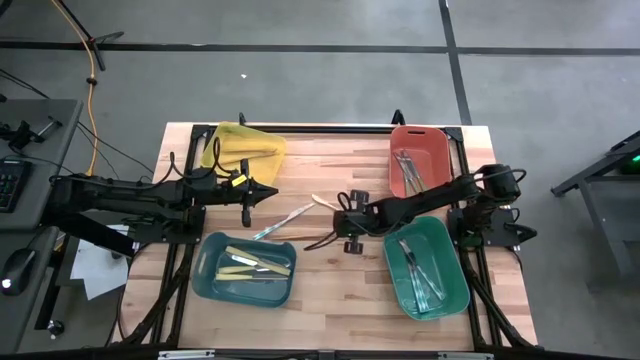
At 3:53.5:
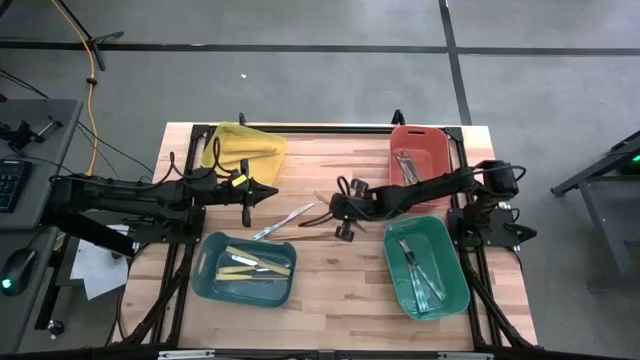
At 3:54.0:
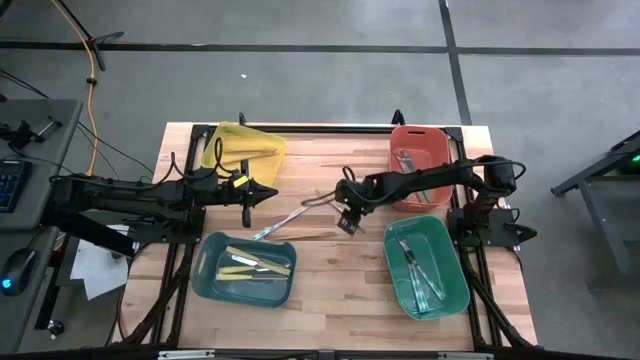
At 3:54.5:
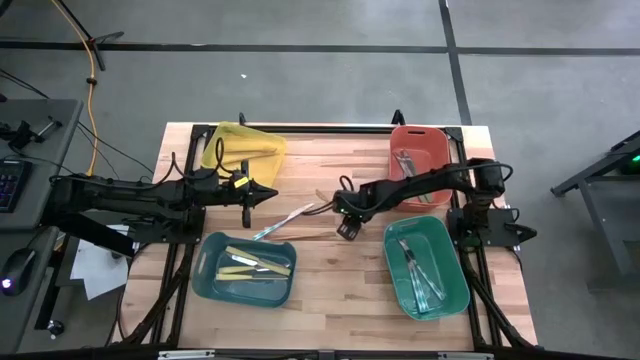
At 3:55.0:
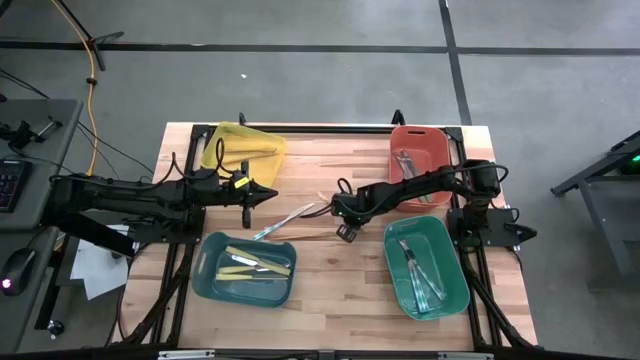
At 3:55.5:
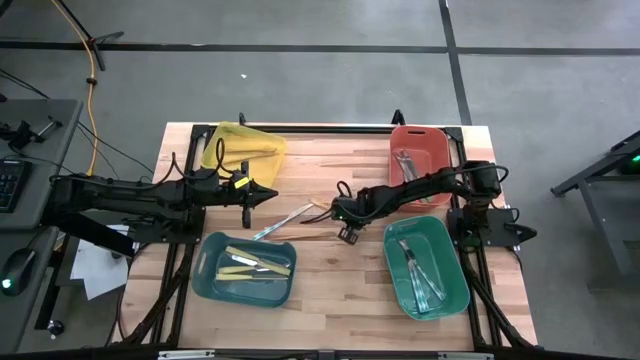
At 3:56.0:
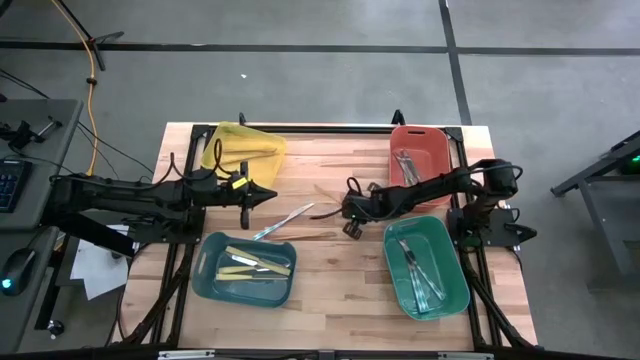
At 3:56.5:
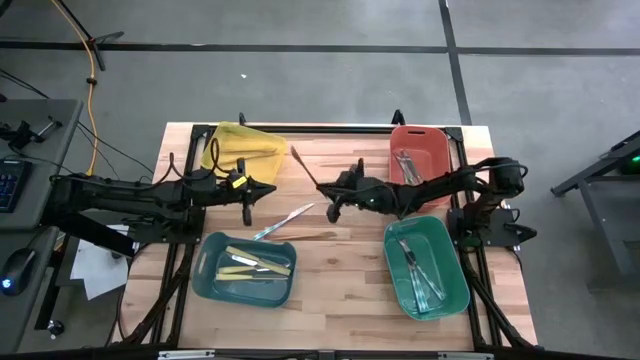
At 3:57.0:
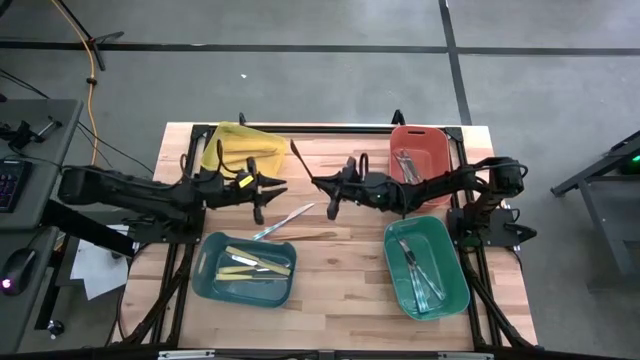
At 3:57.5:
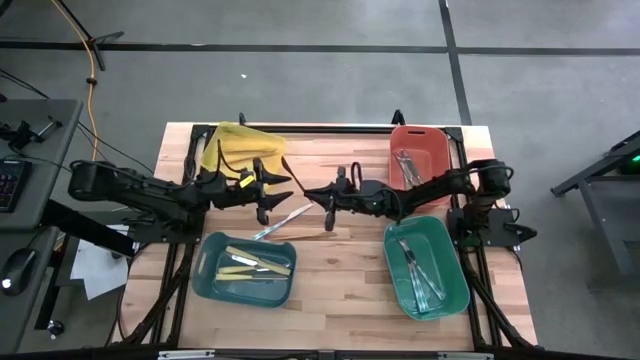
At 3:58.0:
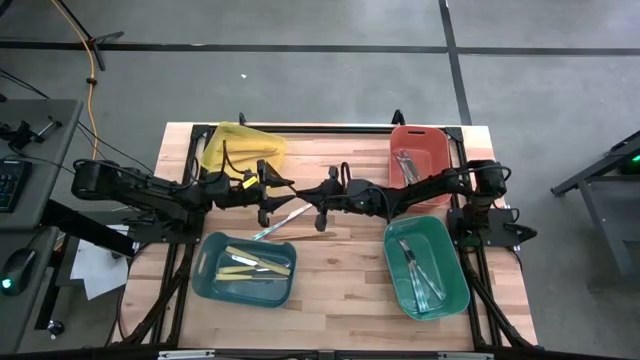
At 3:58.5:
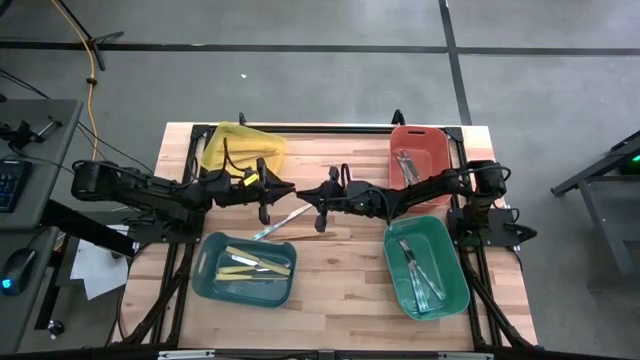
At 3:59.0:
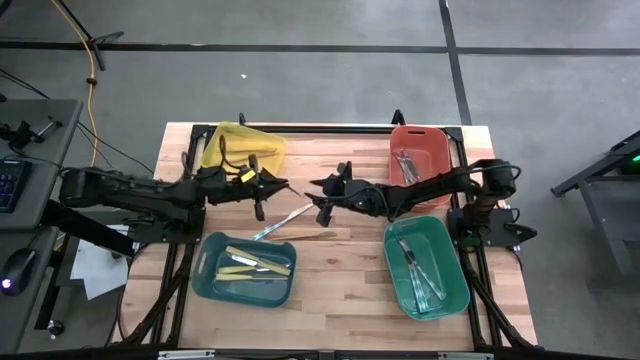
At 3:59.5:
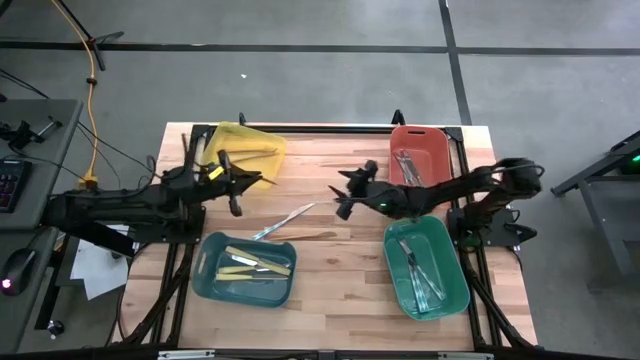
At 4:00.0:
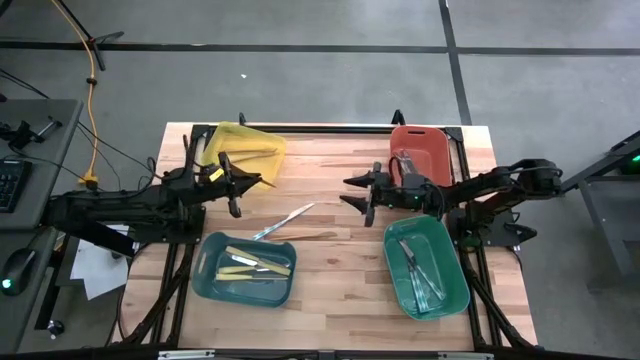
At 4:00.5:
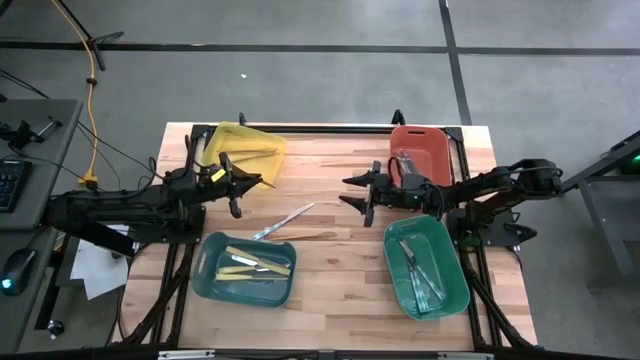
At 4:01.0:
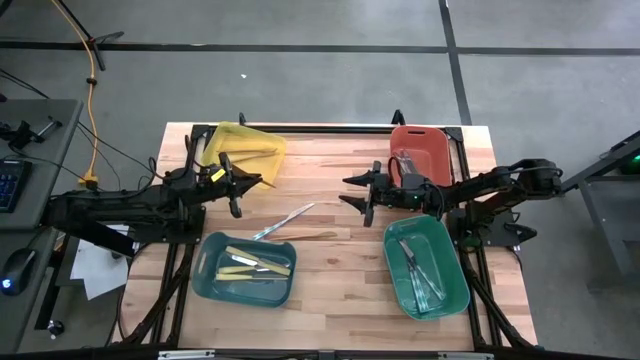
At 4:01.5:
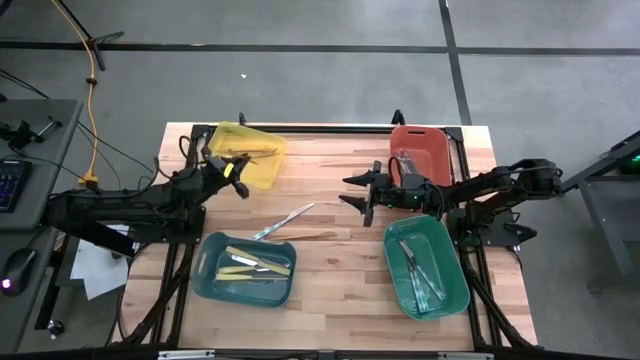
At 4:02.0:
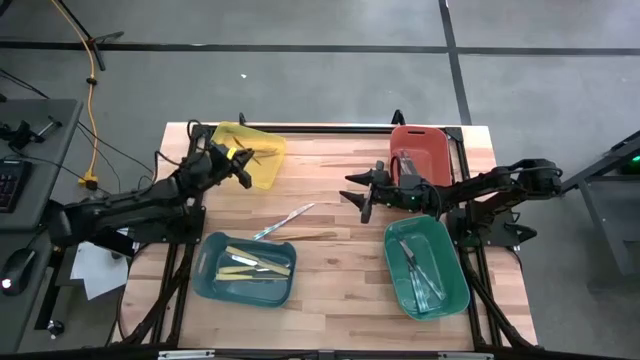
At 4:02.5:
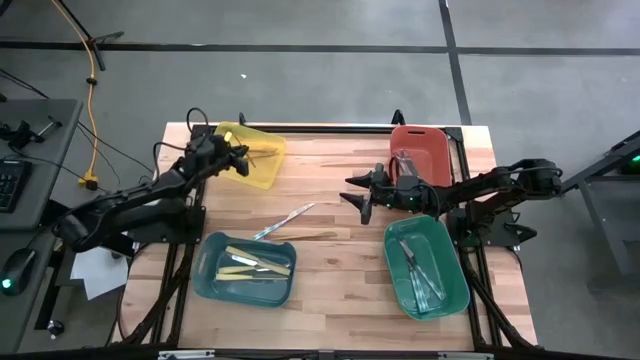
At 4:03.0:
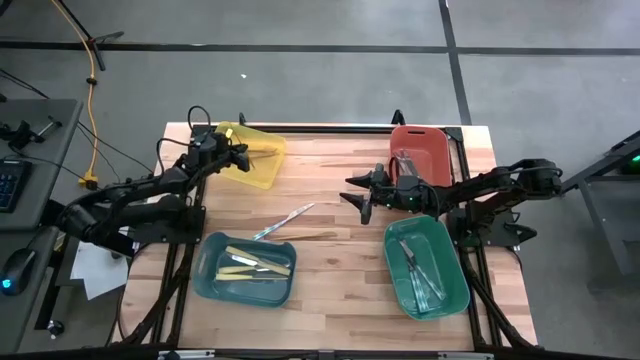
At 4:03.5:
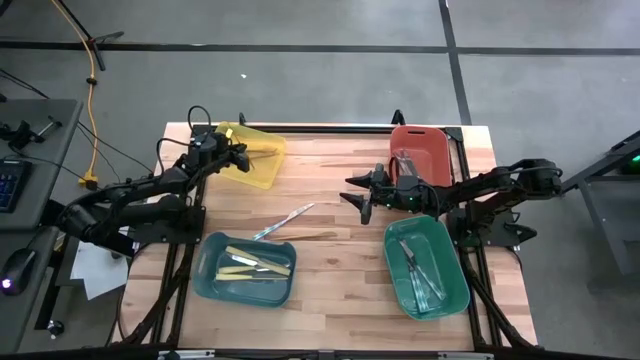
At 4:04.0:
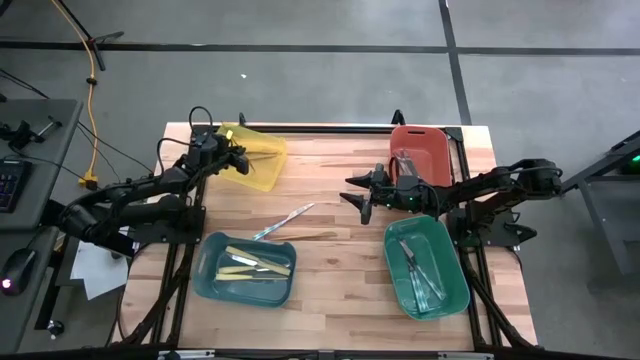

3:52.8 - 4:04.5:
Task: Sort silverware by color (type)
Put the gold knife into the yellow bin

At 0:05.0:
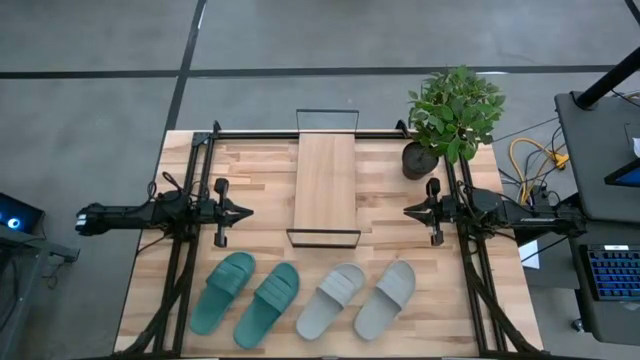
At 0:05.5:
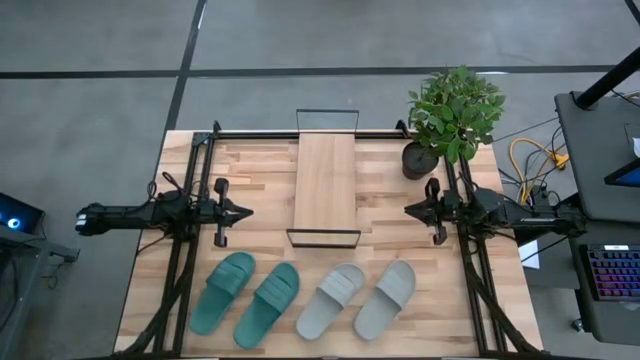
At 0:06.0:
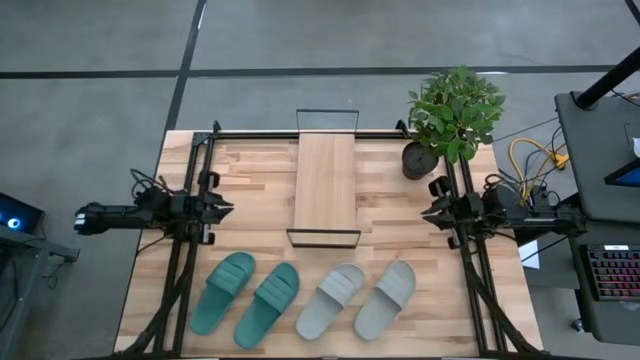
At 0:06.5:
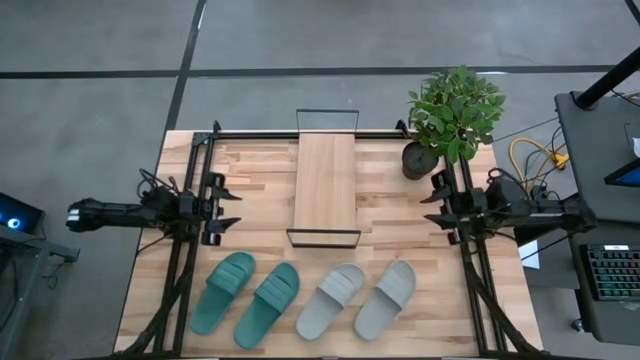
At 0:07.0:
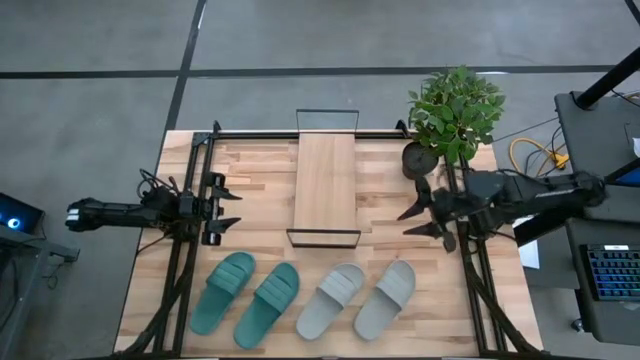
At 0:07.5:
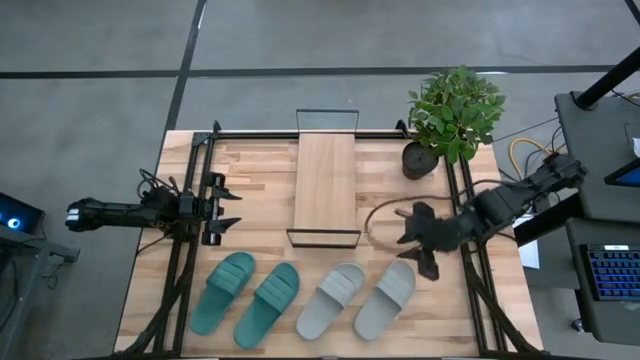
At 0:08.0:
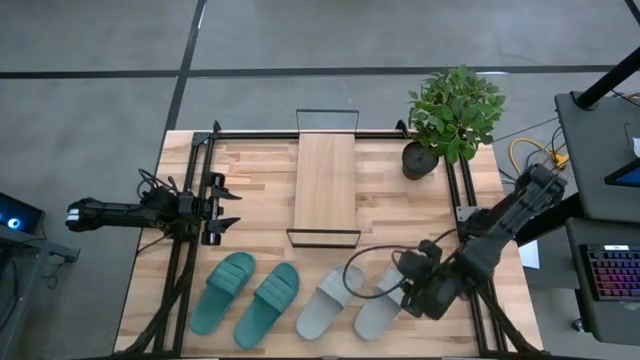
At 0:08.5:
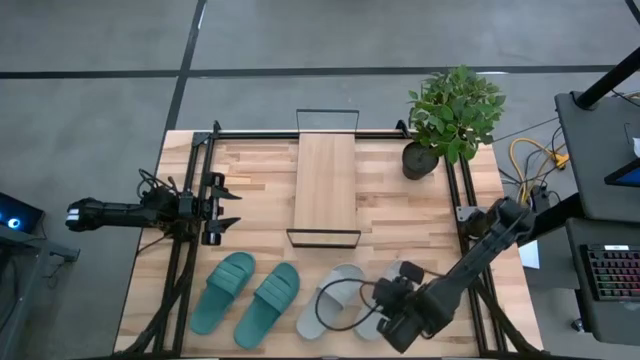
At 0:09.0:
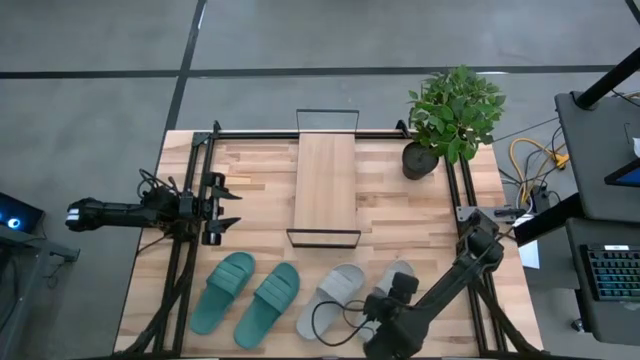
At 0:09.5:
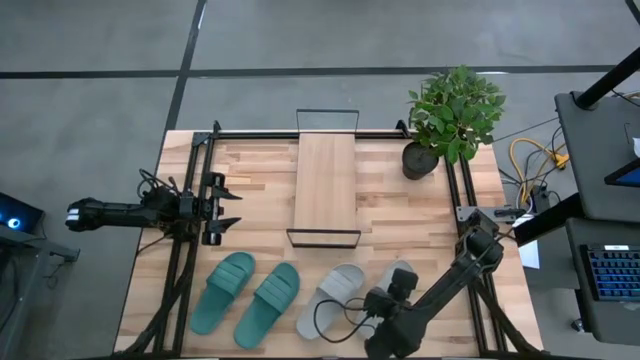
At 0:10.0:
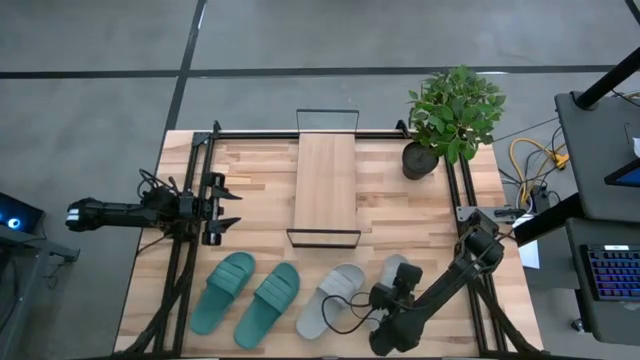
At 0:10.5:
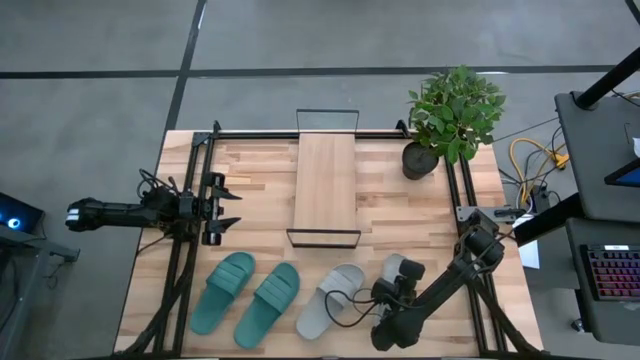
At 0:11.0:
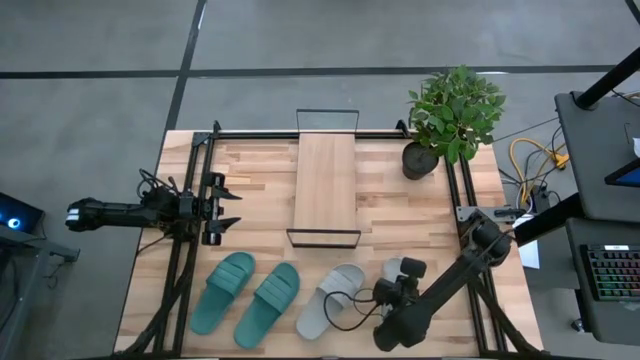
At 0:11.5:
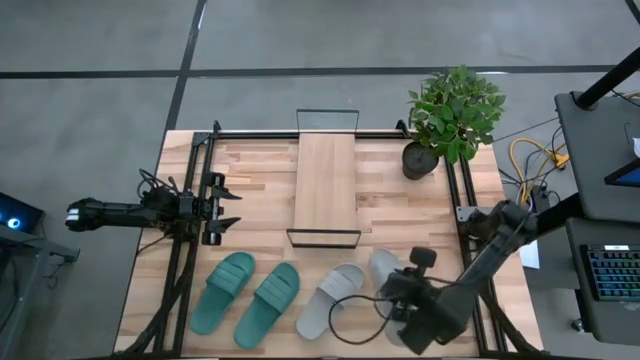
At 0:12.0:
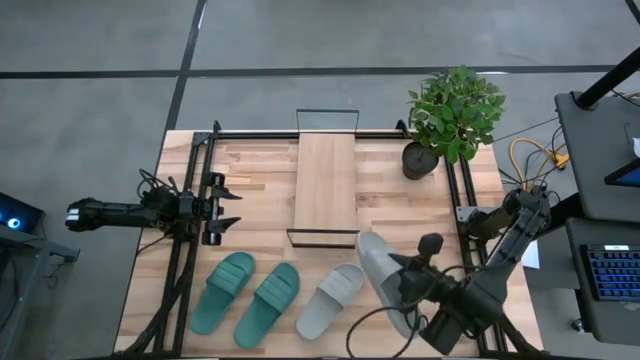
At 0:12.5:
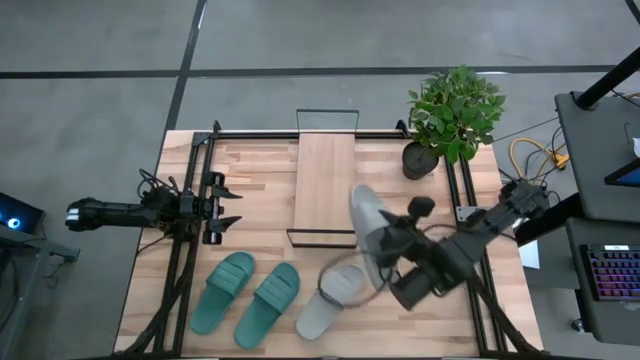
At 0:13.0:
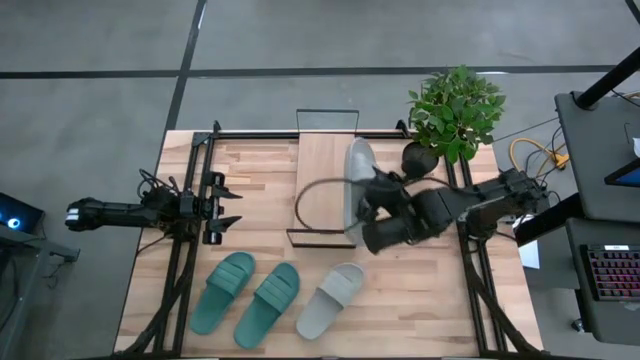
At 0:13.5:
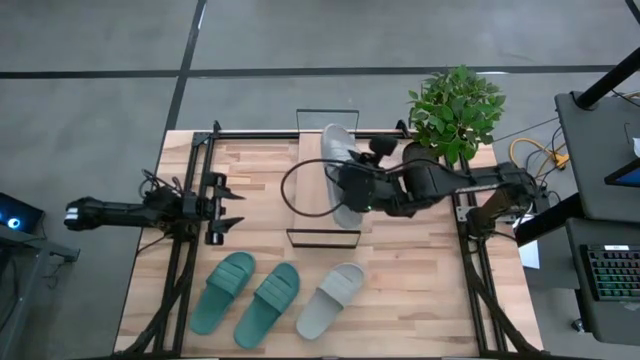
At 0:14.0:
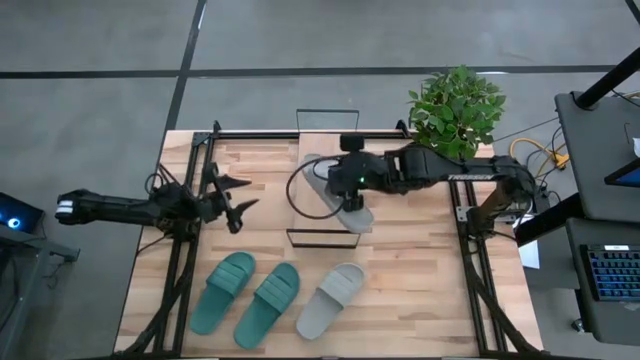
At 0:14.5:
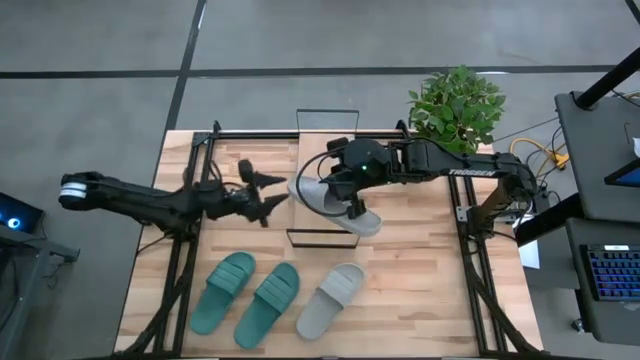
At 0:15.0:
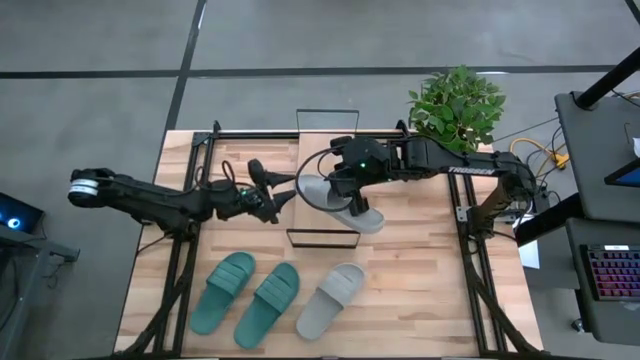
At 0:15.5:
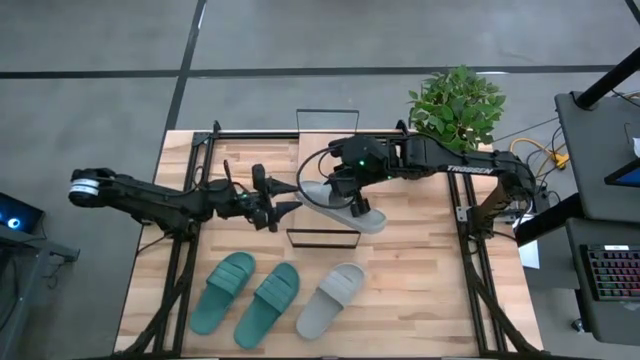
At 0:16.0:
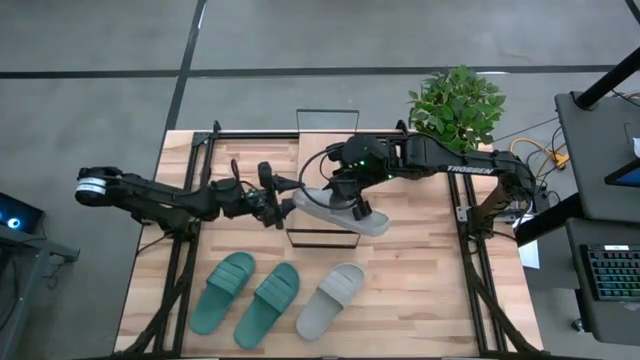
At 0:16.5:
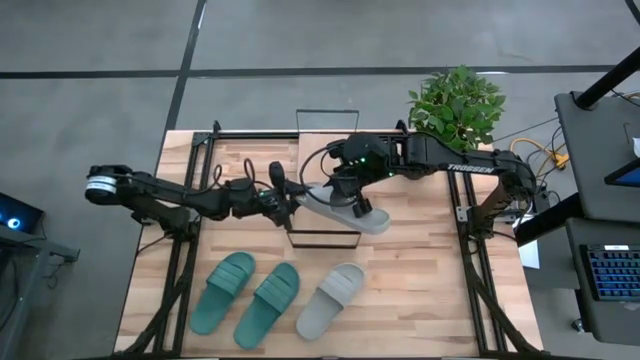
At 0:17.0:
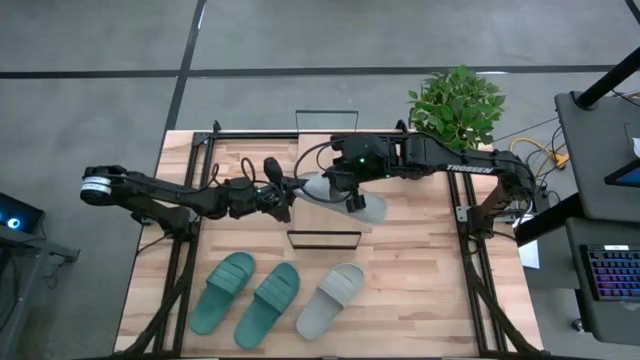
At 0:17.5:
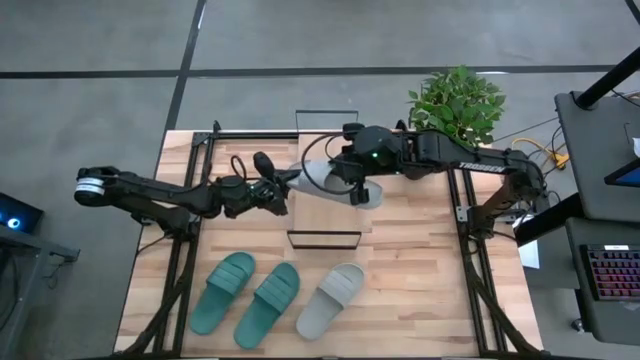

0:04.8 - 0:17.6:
Task: Pick and place slides into the shelf
Put the right gray slipper on the shelf
